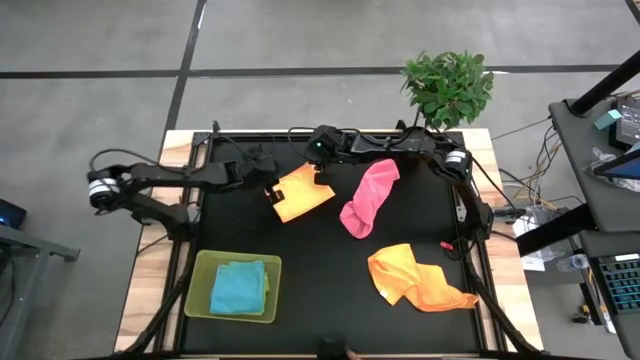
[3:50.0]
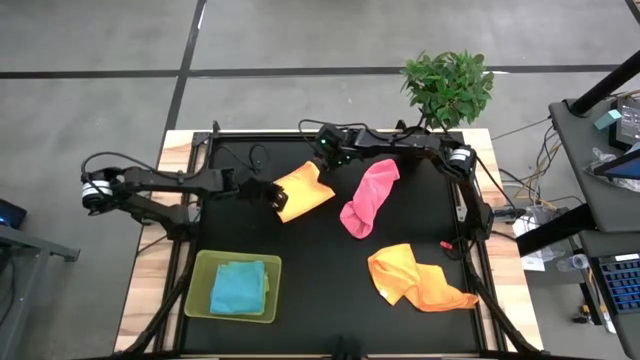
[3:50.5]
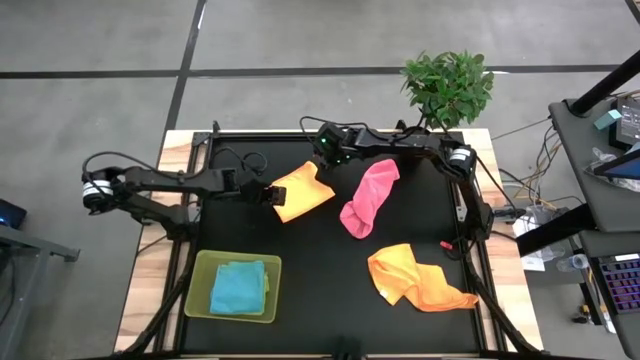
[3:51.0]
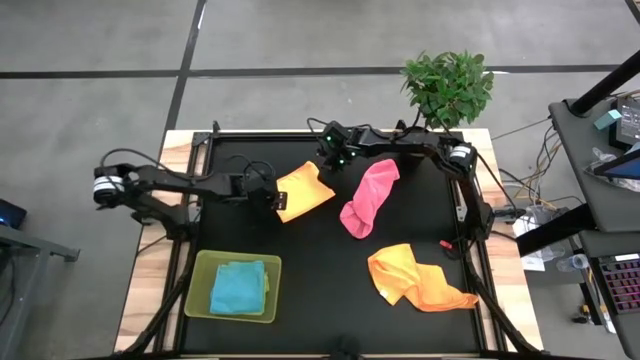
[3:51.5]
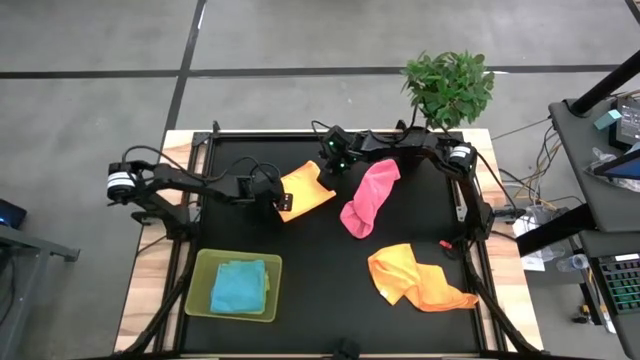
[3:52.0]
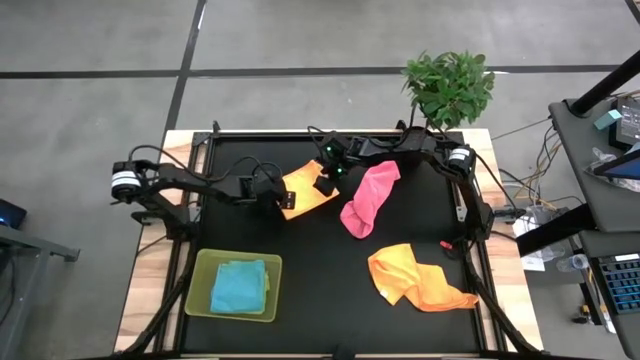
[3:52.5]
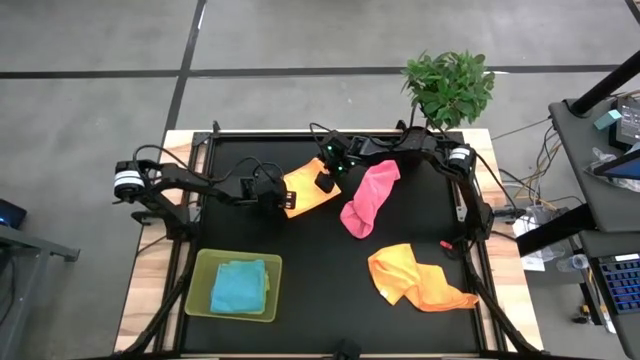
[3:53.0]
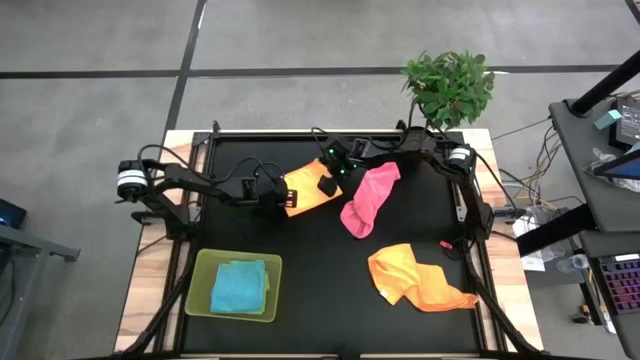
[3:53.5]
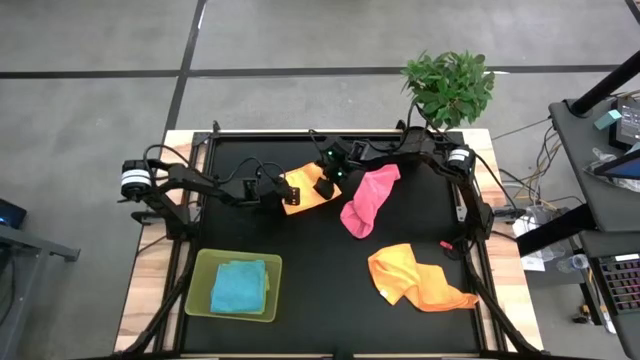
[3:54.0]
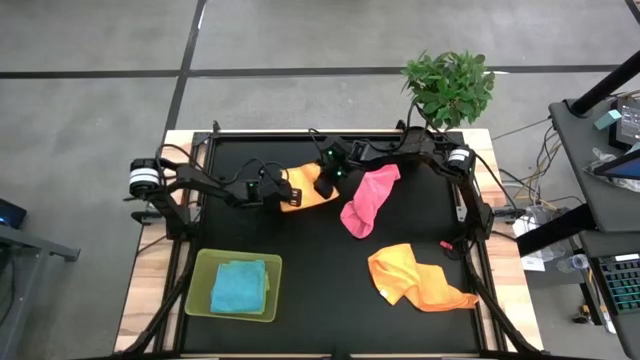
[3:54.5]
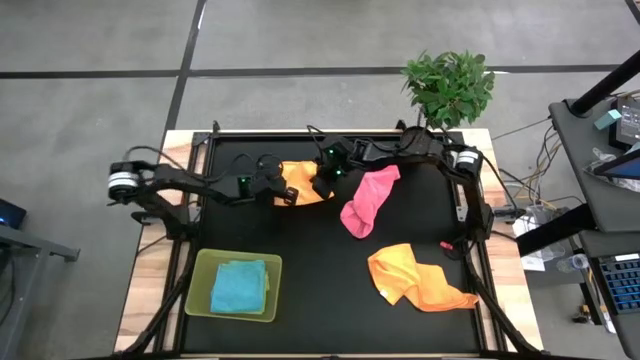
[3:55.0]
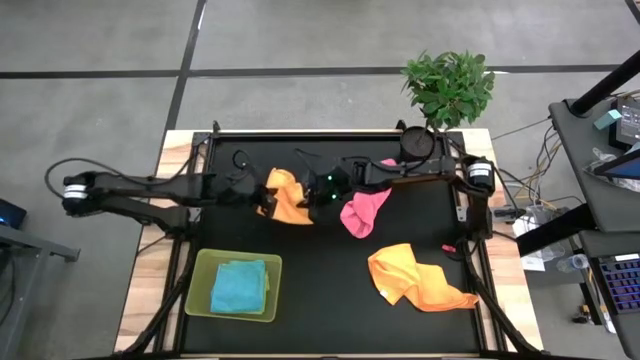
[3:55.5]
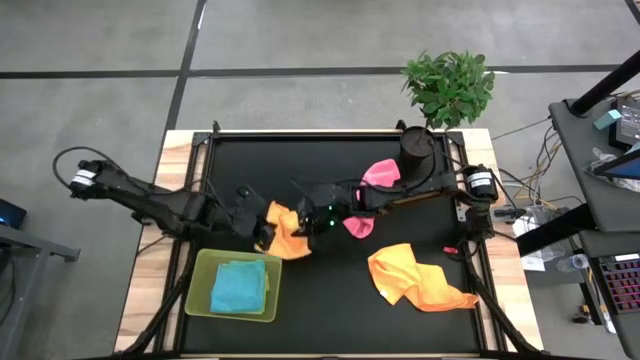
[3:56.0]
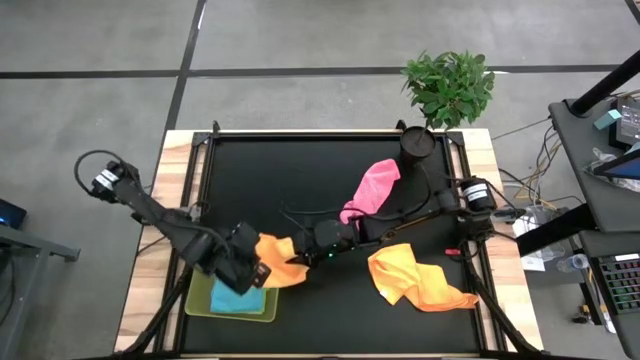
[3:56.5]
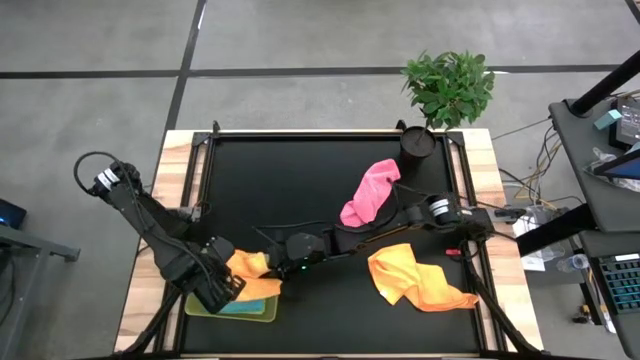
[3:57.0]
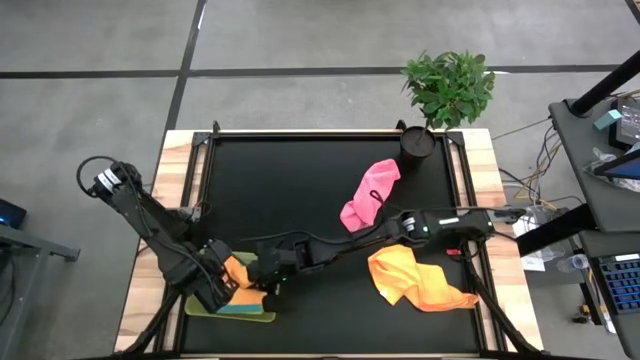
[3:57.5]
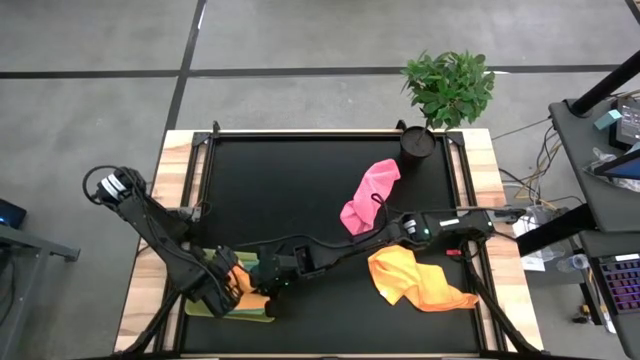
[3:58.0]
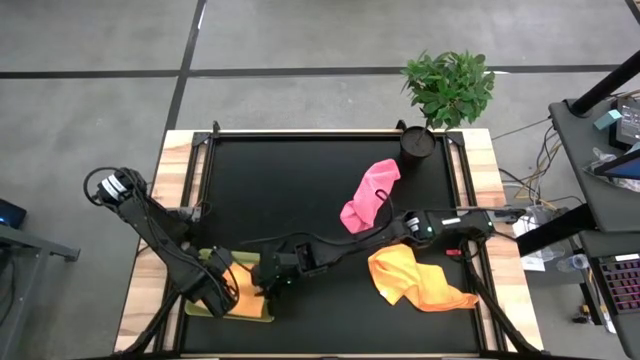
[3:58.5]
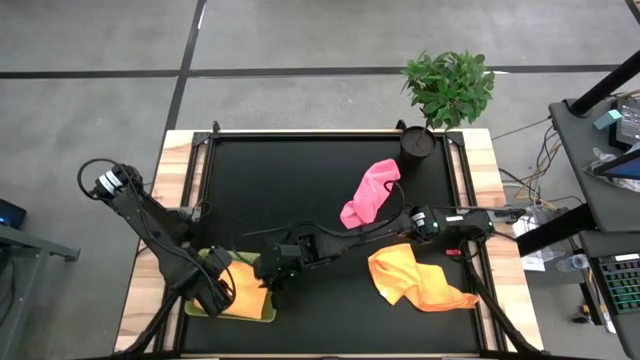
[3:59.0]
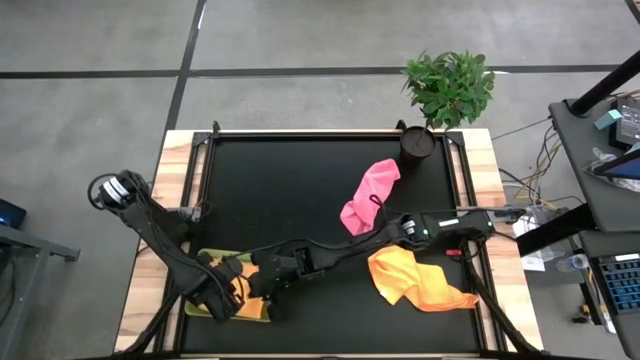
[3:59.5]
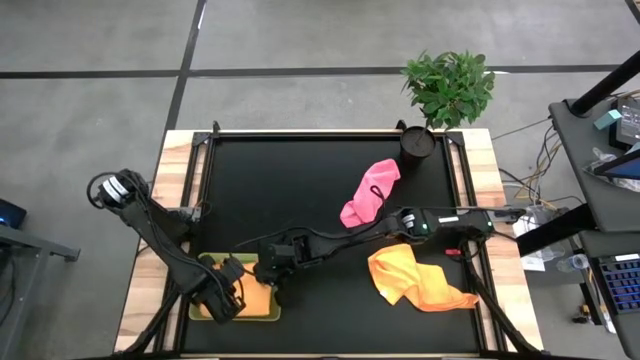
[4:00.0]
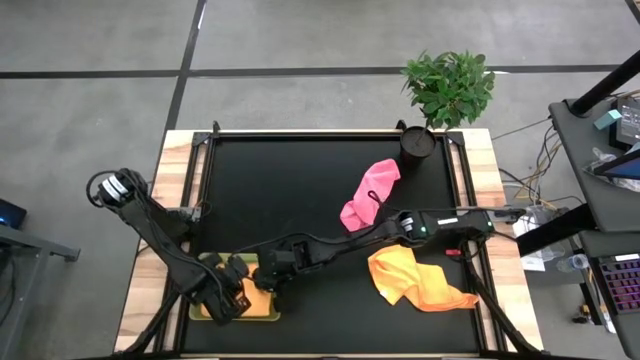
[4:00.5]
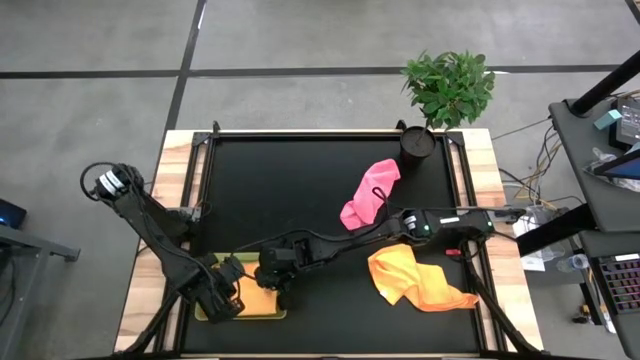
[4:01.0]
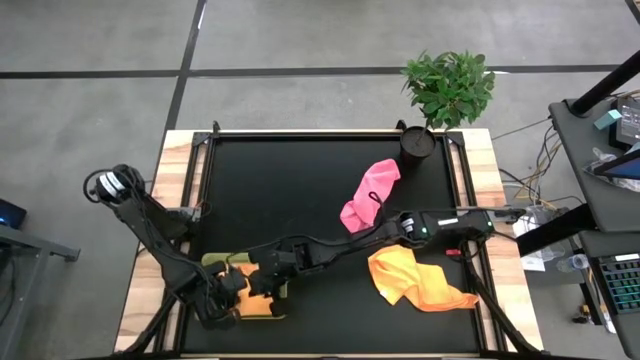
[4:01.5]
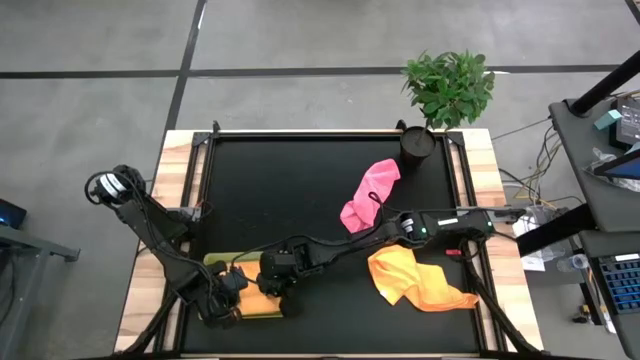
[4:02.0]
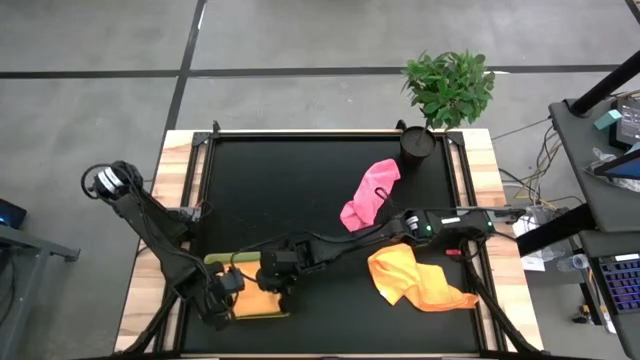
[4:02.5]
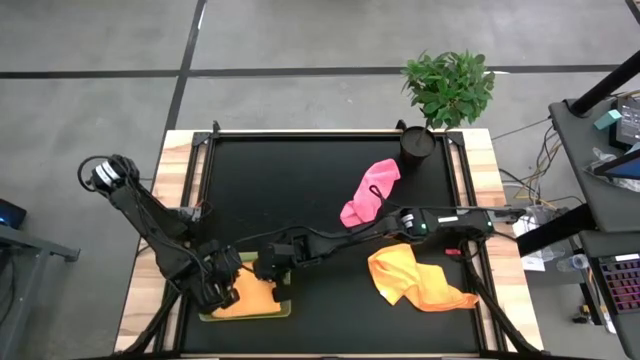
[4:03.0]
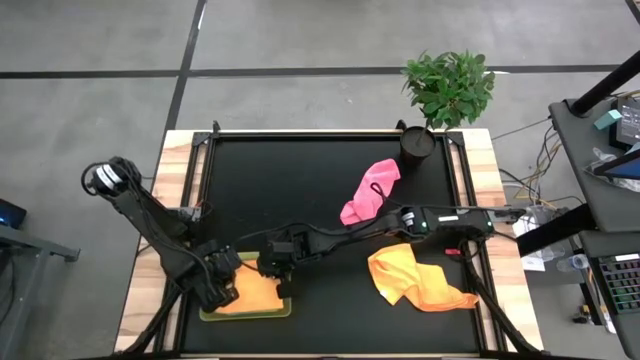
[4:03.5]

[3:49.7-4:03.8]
Task: Fold microfiber towels
Put the folded orange microfiber towel into the yellow bin

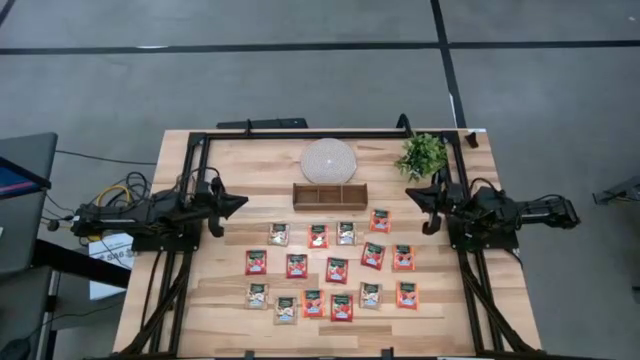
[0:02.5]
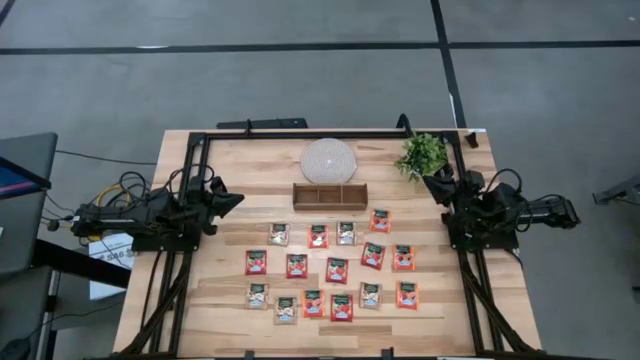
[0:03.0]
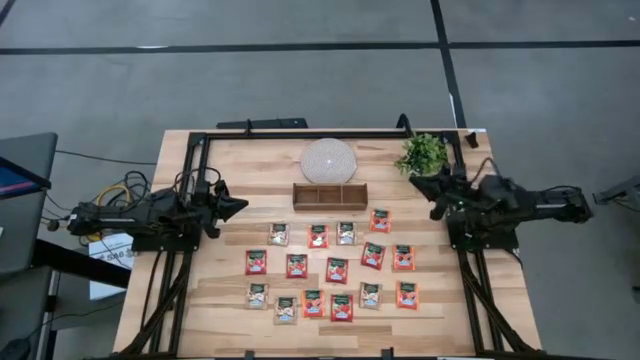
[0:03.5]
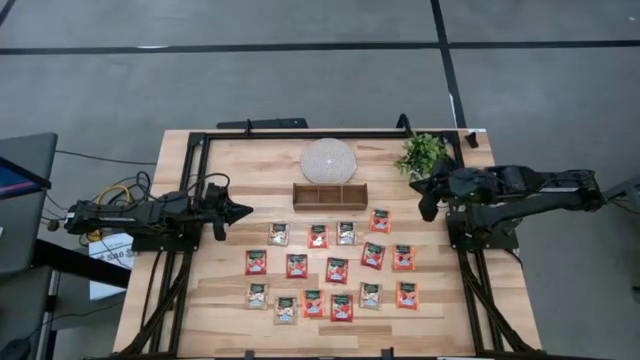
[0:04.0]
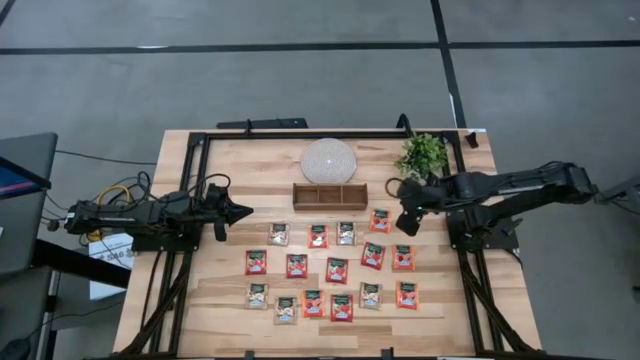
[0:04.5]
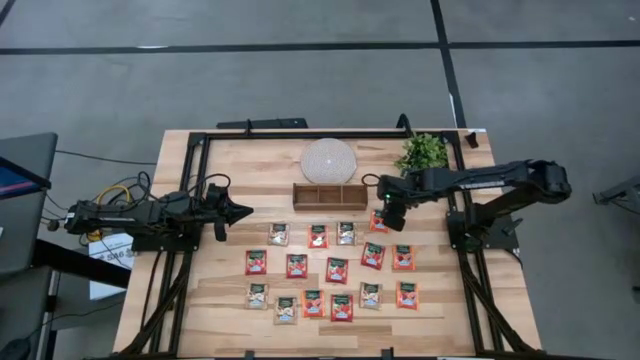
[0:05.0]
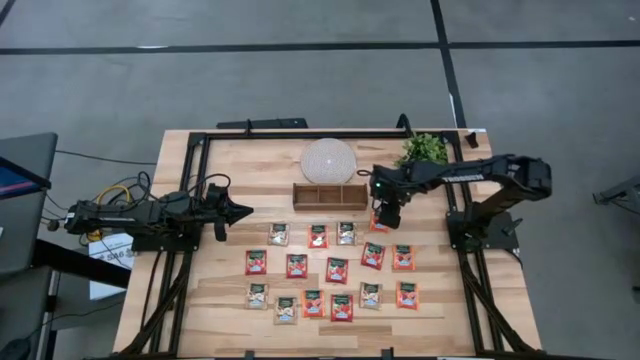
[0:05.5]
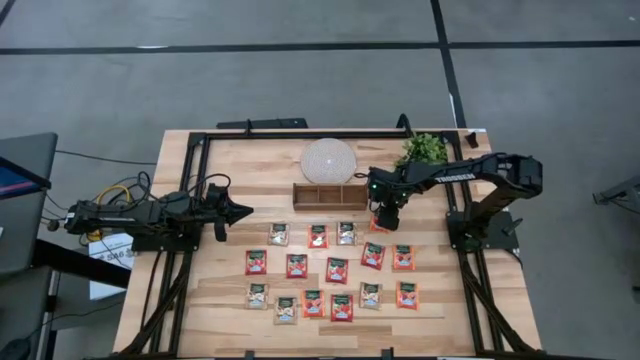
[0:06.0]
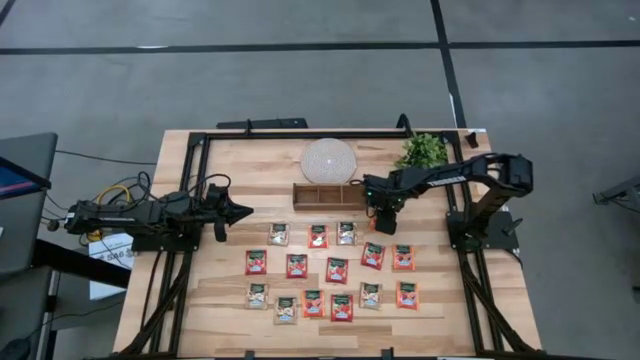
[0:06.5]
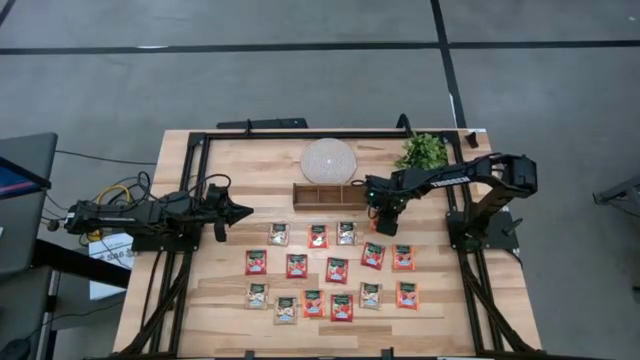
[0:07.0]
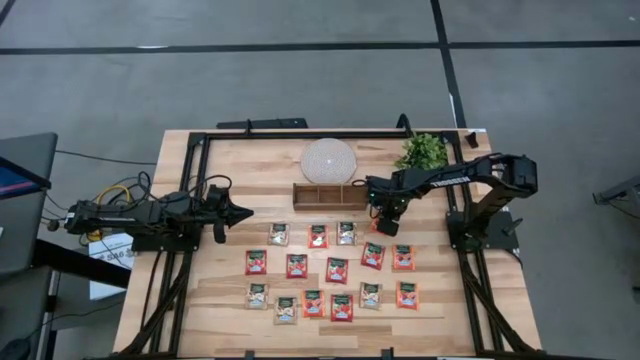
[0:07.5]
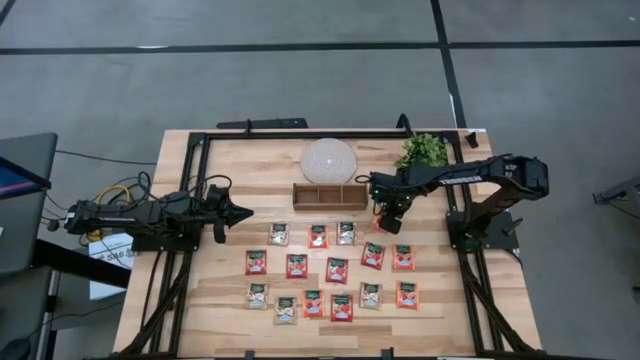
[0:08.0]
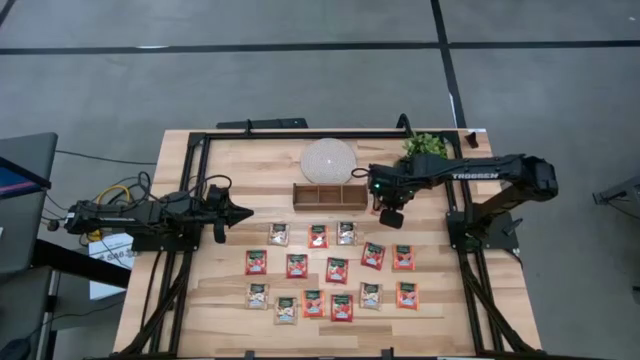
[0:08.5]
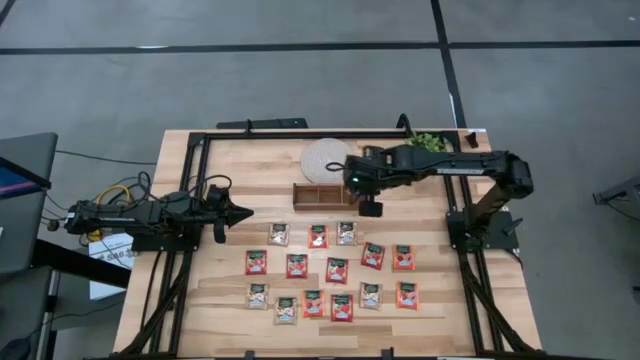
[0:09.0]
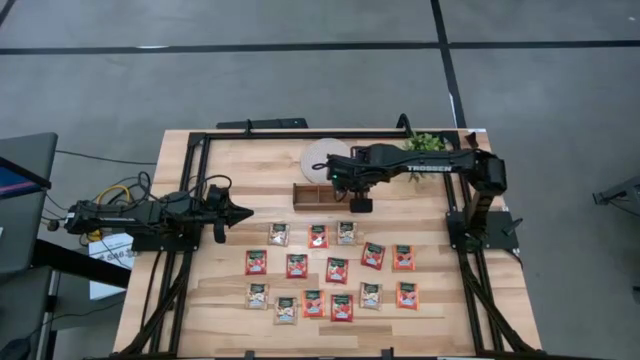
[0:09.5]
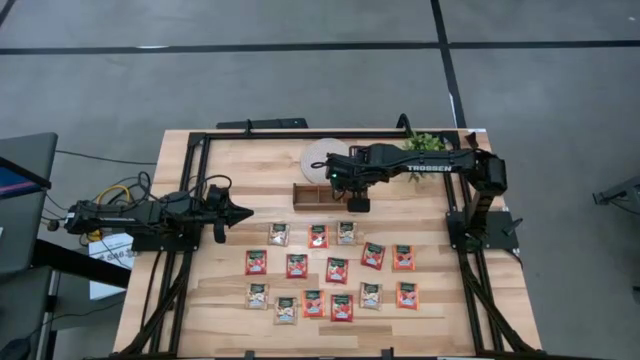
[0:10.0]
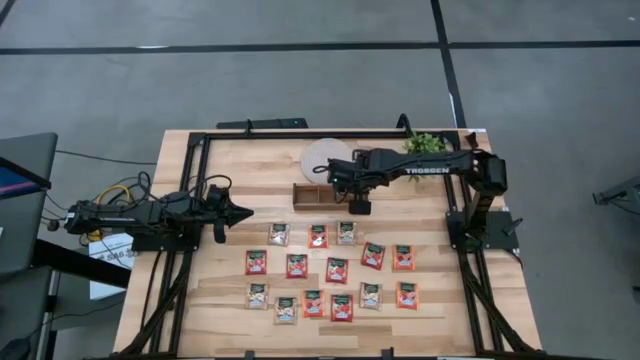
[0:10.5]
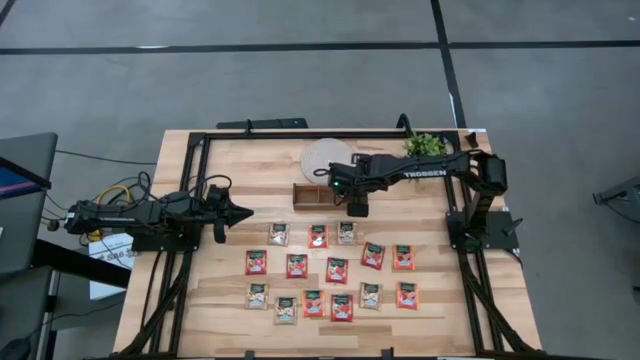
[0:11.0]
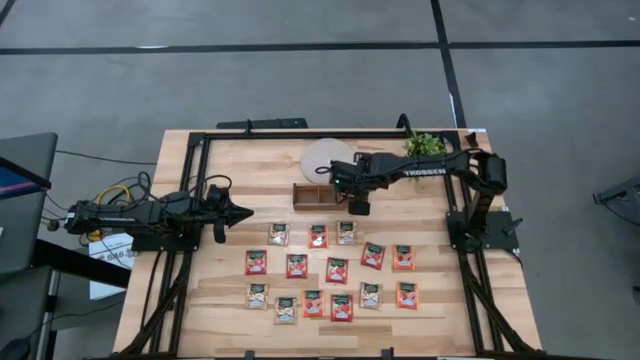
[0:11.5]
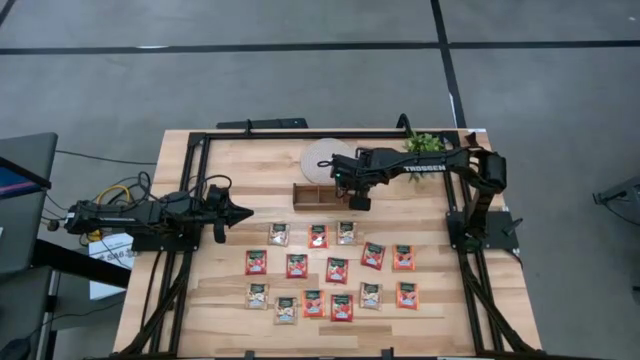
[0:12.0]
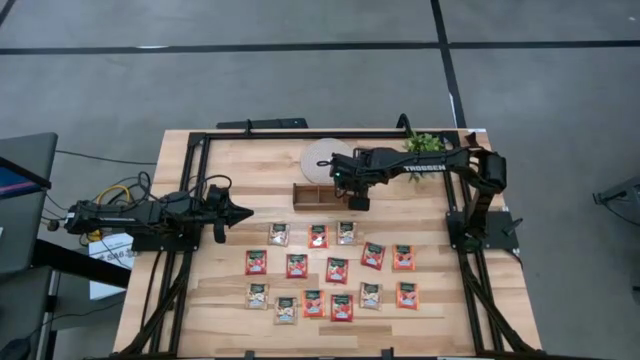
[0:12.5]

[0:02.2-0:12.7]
Task: Pick & Place Tea
Put the orange tea bag into the right compartment of the wooden organizer
